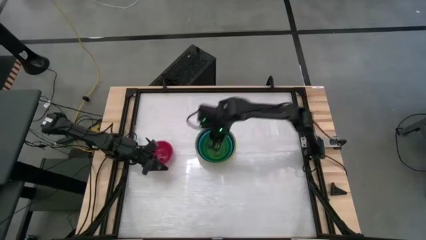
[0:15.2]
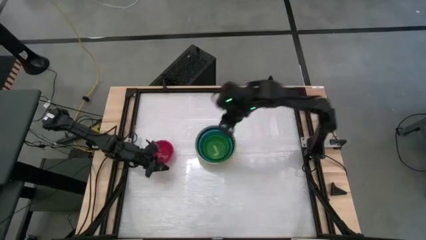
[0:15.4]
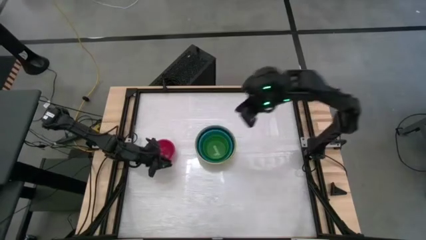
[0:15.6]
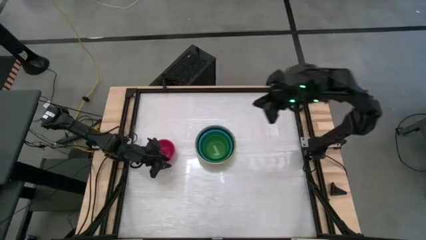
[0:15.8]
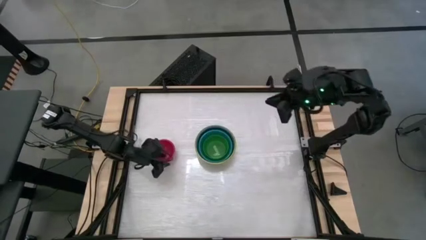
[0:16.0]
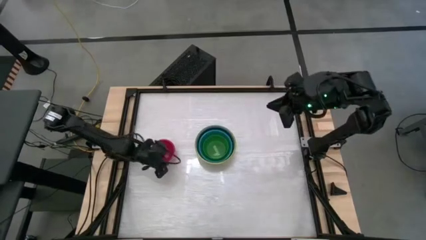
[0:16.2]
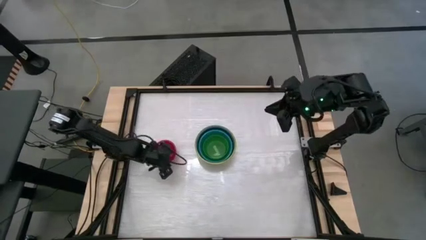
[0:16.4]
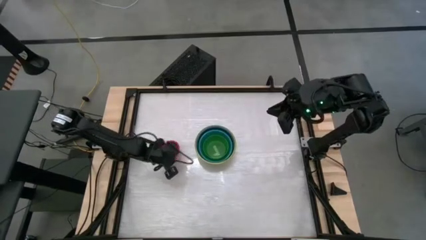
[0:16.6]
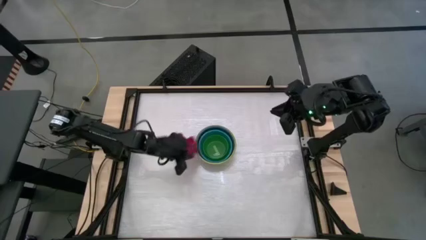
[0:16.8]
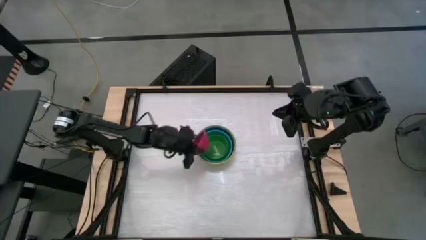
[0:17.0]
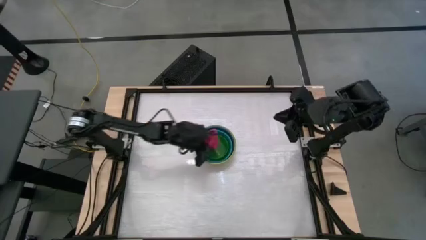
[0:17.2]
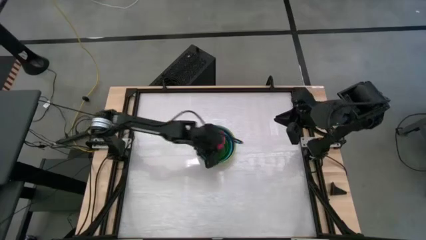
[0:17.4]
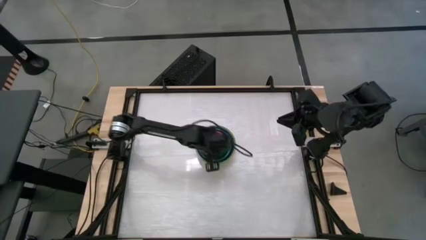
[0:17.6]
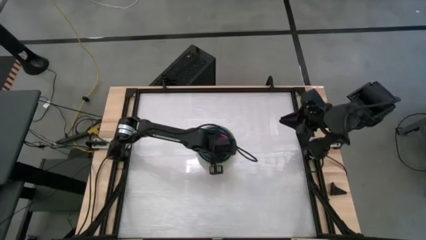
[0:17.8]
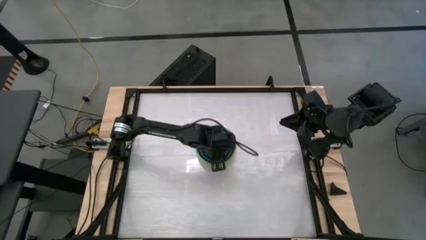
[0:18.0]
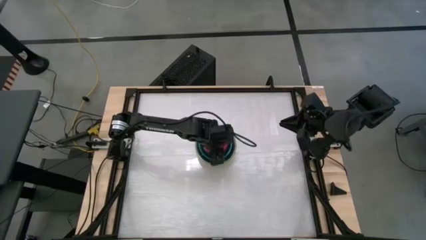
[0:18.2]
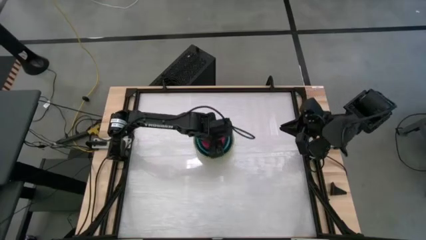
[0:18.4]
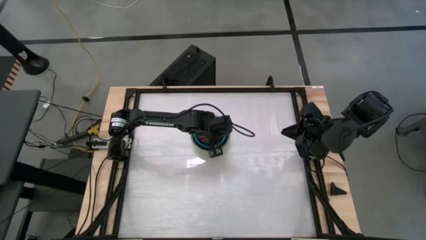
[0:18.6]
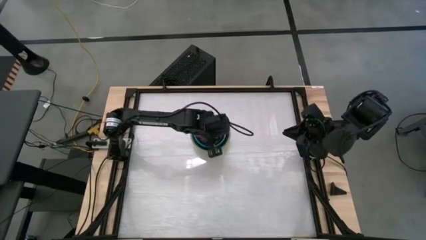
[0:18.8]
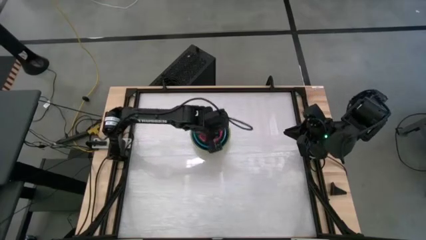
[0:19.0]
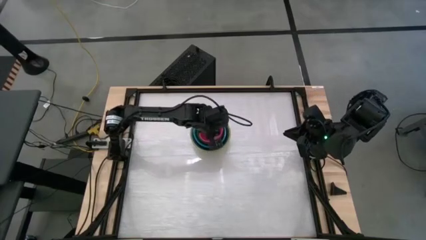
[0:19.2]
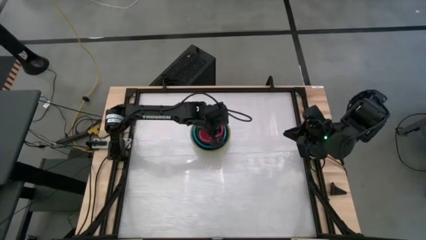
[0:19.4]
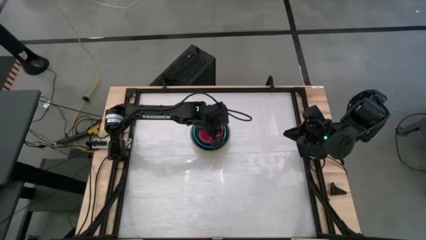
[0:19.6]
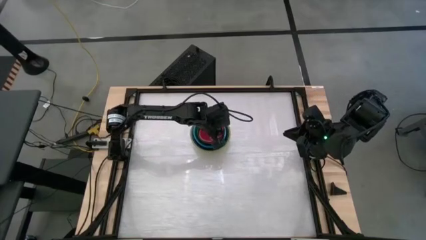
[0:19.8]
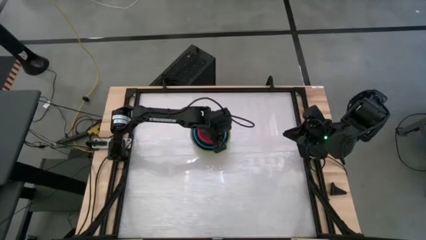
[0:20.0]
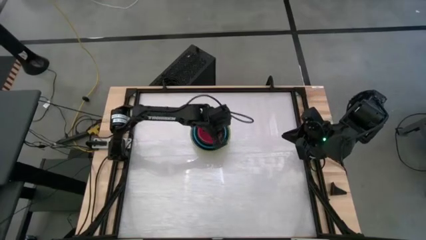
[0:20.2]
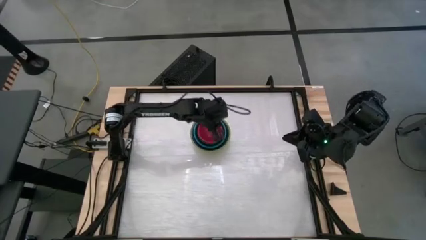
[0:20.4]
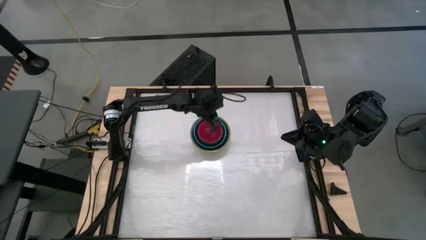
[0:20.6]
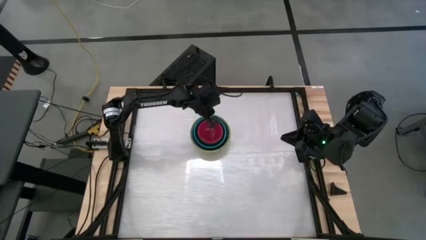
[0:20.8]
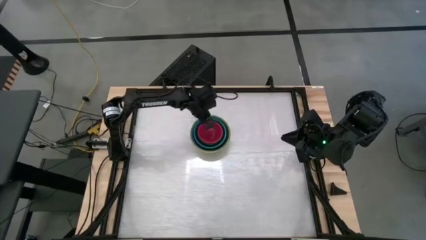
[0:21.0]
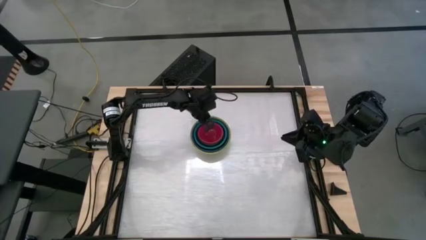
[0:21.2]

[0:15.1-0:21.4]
Stack the red bowl on top of the green bowl

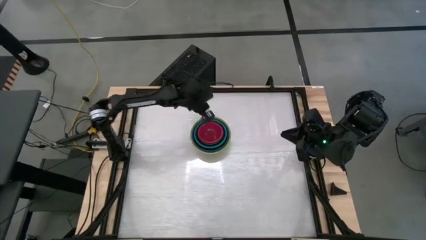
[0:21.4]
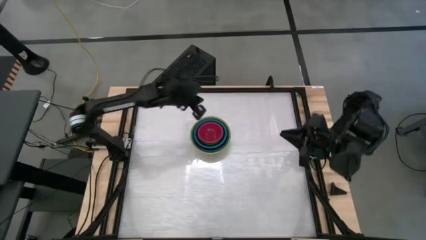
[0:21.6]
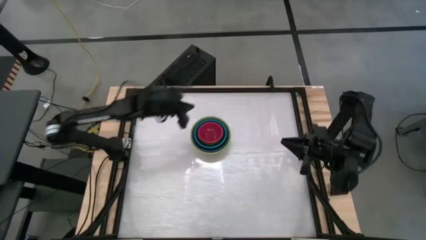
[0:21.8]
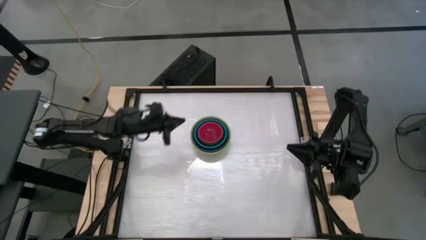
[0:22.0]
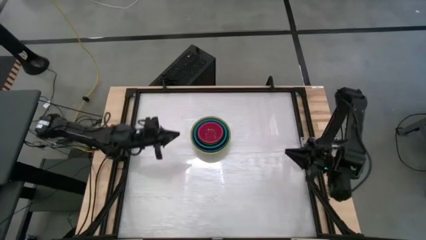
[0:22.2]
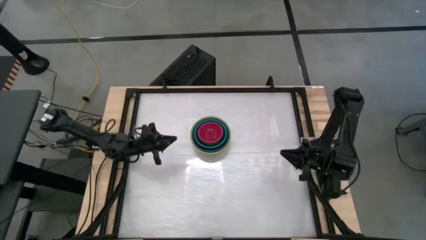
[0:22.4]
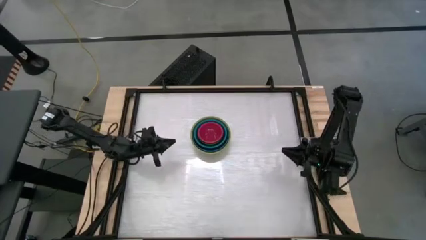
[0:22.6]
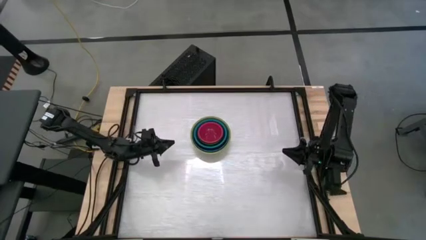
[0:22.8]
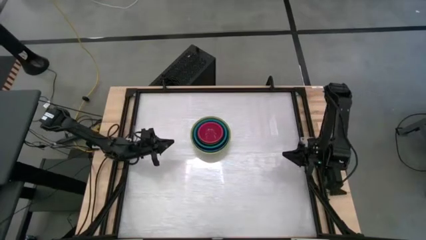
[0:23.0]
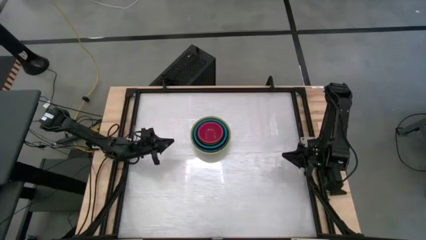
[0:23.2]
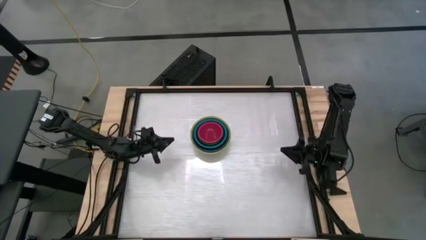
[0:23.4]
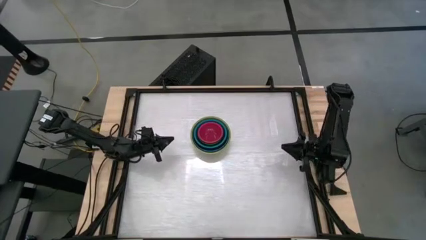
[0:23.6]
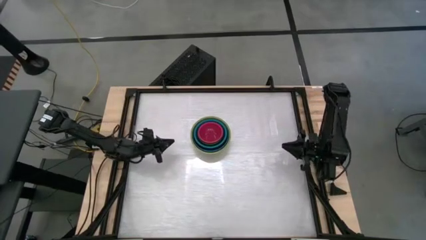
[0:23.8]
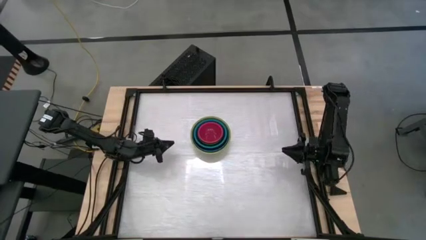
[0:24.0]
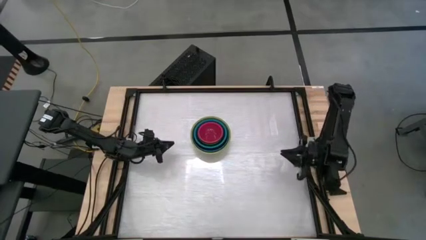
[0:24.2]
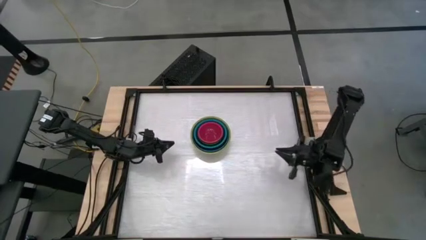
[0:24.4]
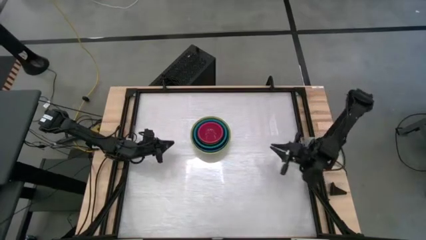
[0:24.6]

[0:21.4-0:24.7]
Return to Home Position

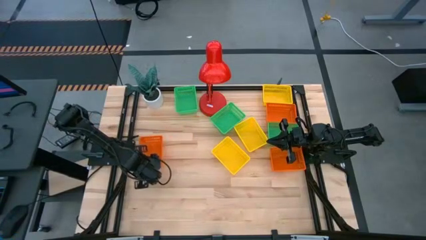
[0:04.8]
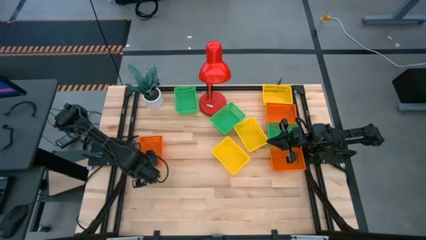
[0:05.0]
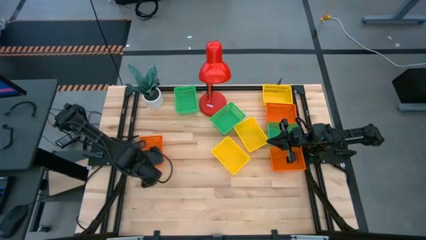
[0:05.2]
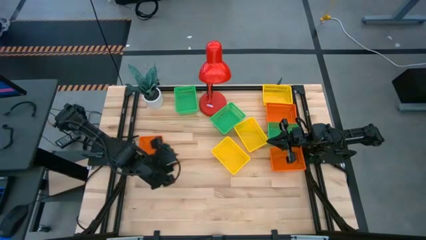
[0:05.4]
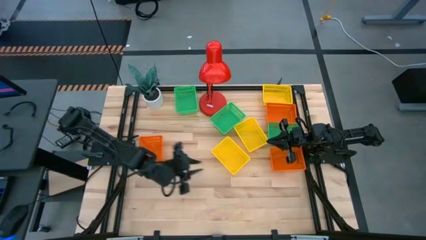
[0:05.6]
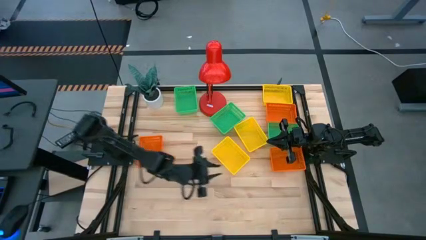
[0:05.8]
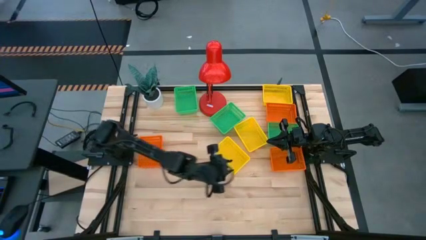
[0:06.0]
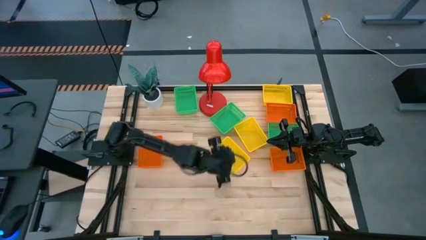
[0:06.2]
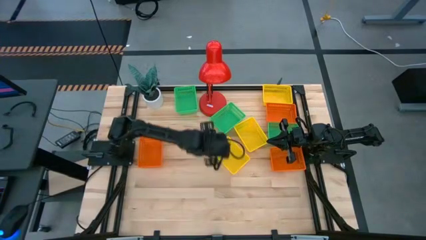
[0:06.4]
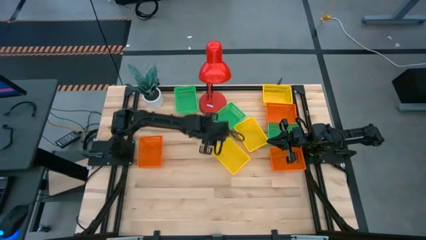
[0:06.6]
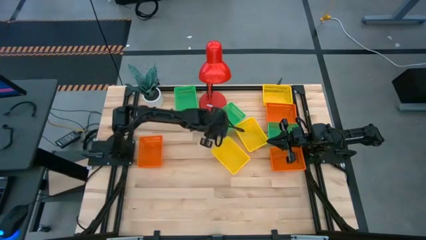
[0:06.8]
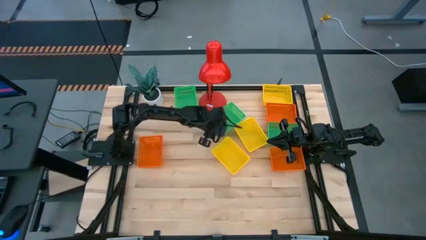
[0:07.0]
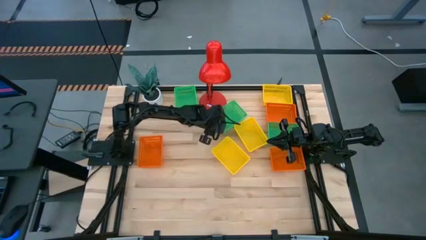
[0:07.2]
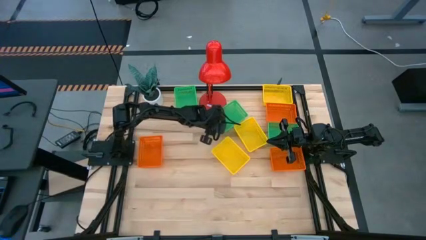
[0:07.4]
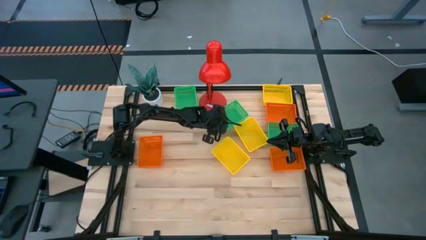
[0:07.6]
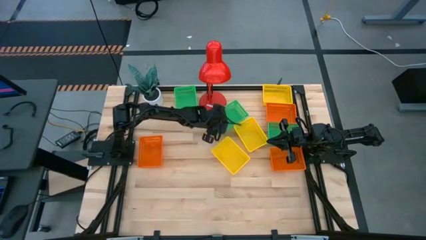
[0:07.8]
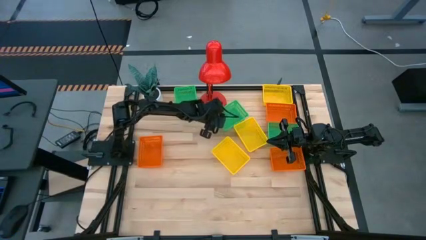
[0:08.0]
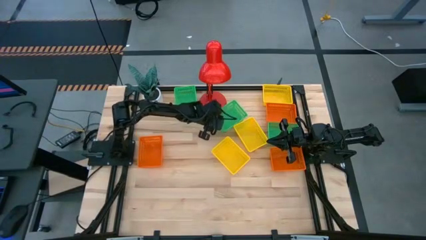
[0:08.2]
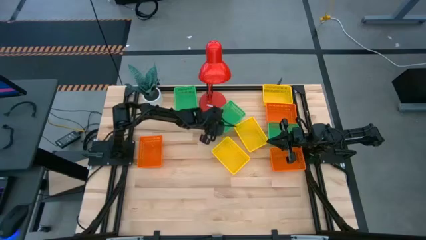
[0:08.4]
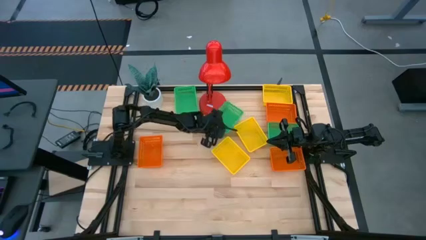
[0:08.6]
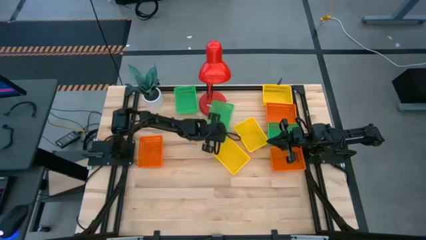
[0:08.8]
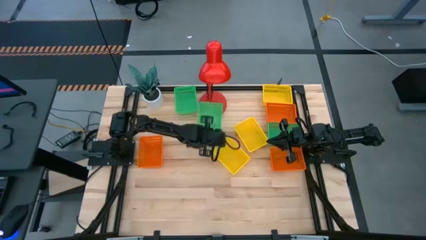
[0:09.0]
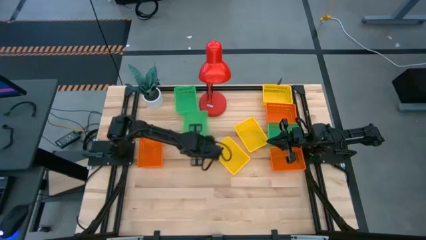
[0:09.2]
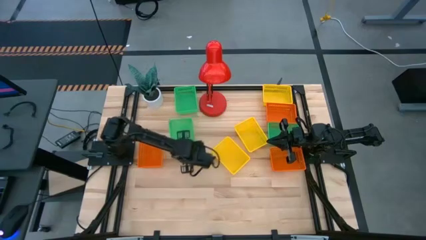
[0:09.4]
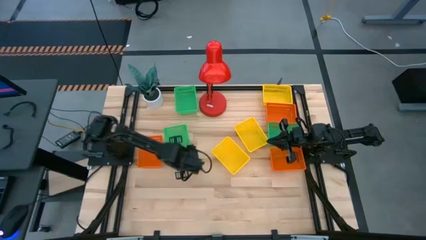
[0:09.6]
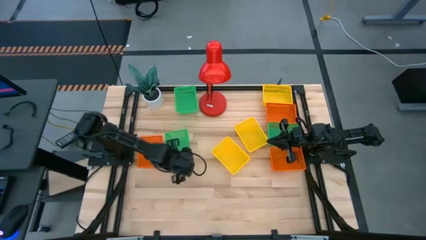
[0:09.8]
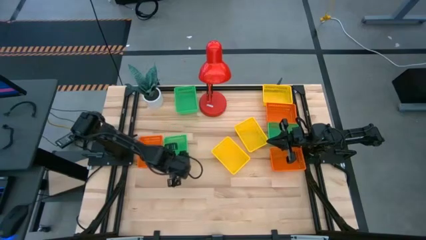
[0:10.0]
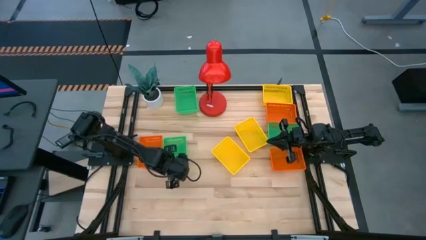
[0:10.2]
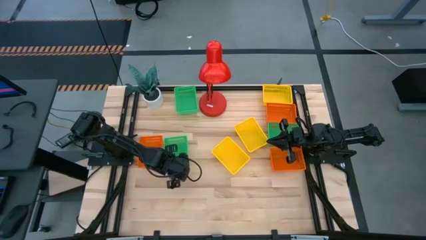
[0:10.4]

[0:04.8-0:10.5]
Move the middle green bin to the right of the orange bin
